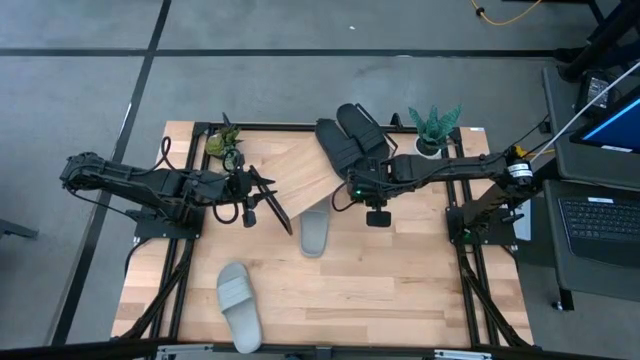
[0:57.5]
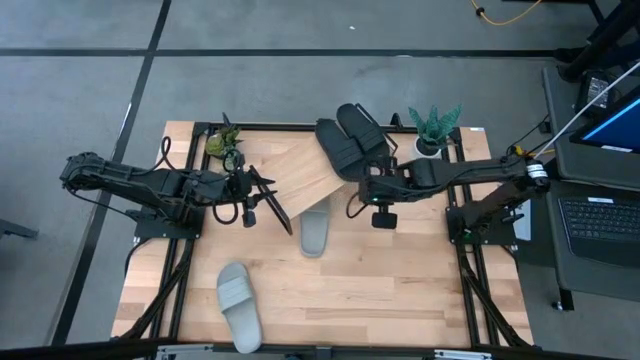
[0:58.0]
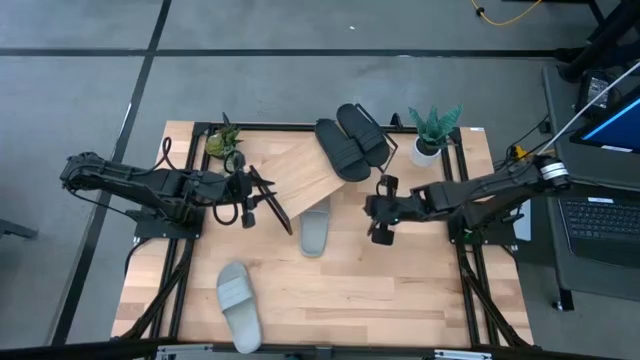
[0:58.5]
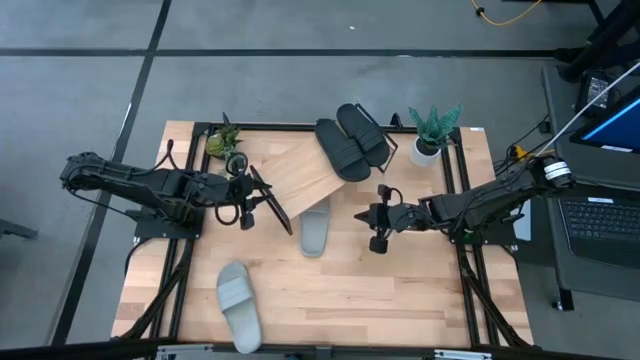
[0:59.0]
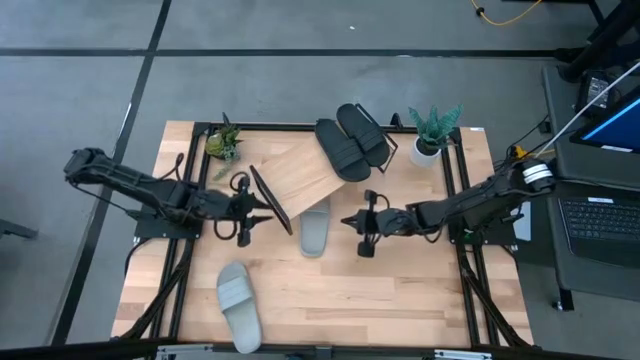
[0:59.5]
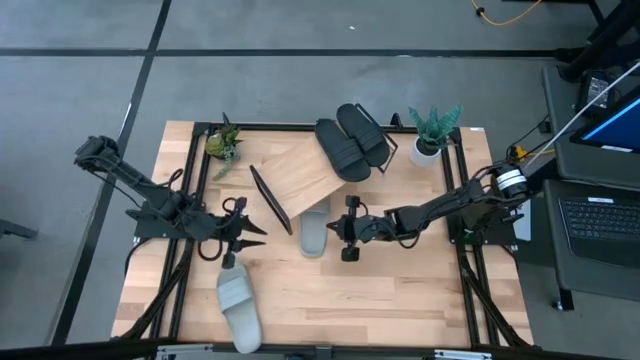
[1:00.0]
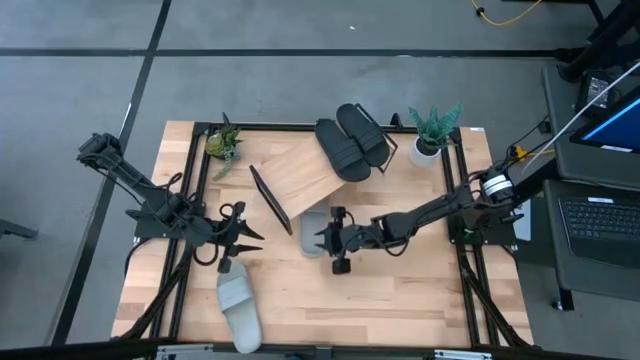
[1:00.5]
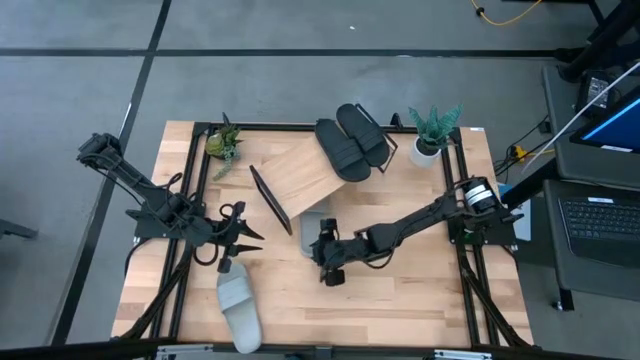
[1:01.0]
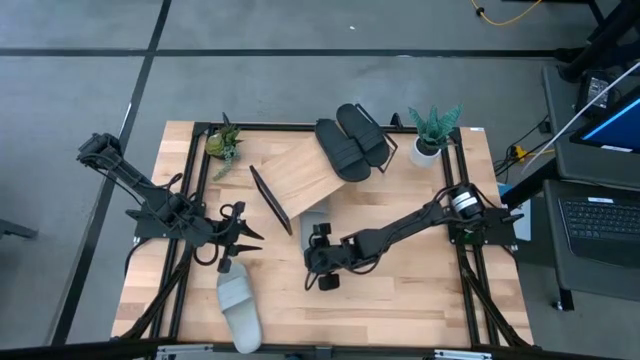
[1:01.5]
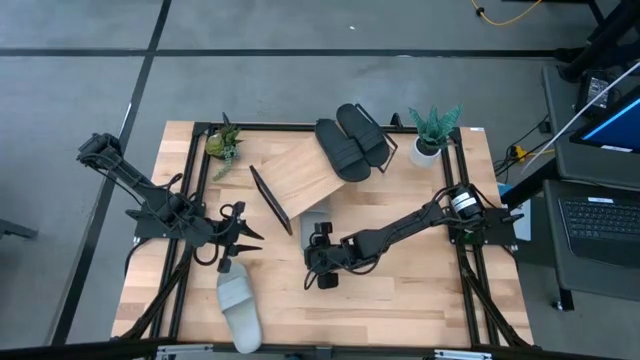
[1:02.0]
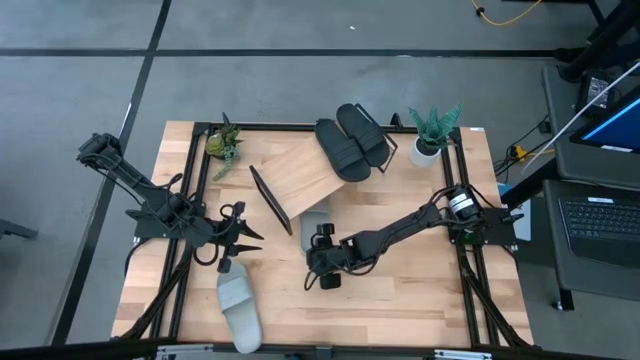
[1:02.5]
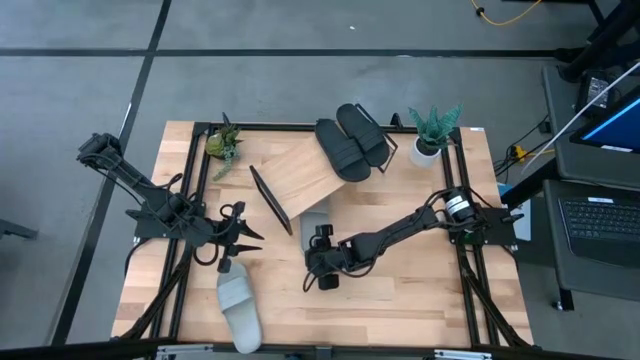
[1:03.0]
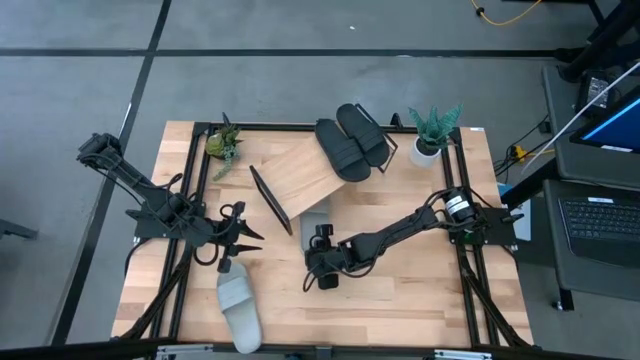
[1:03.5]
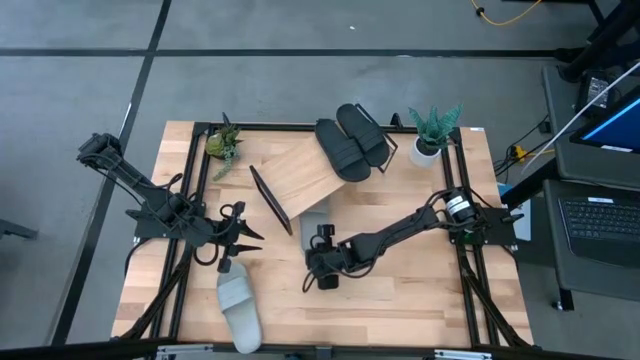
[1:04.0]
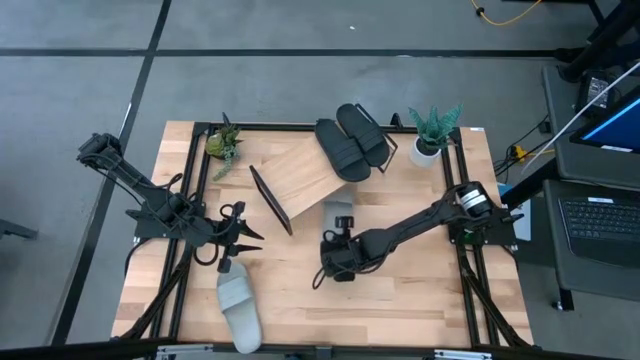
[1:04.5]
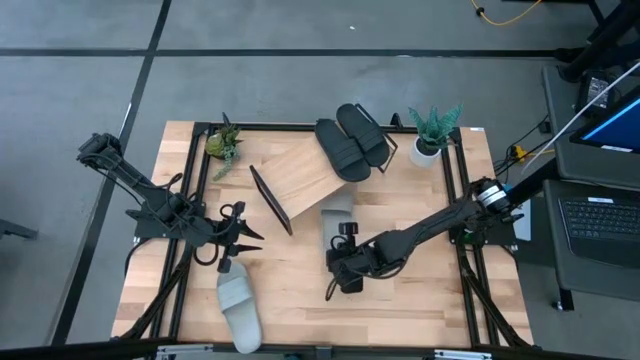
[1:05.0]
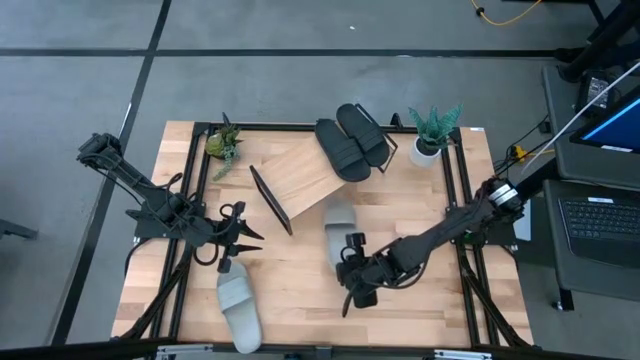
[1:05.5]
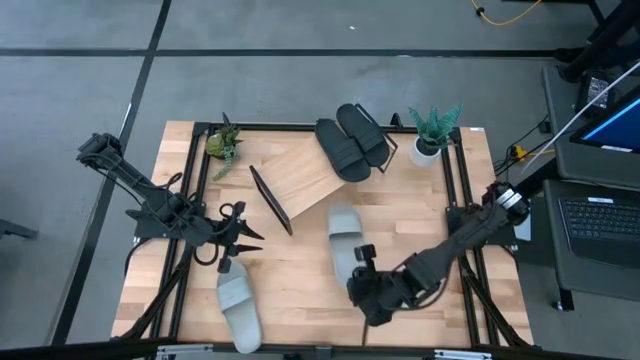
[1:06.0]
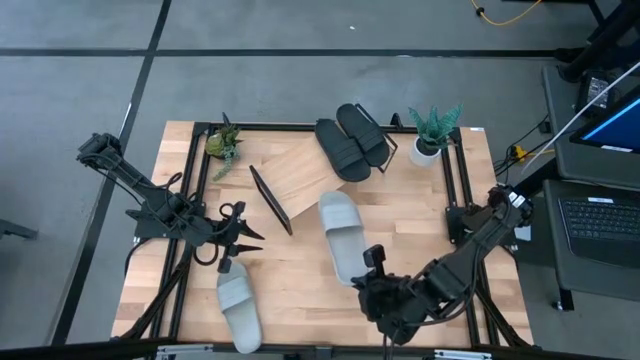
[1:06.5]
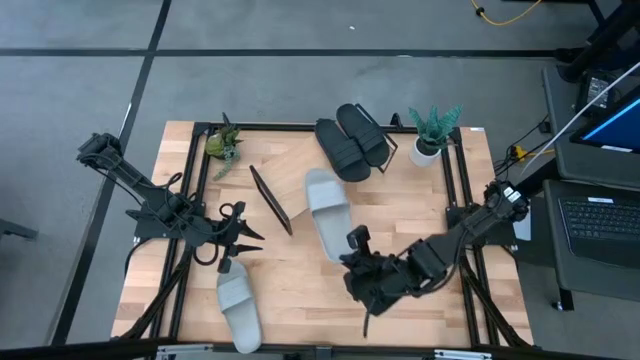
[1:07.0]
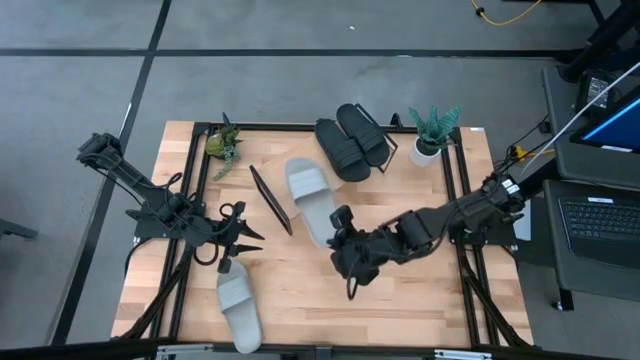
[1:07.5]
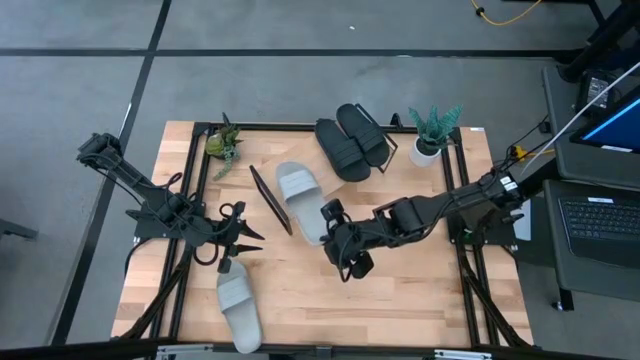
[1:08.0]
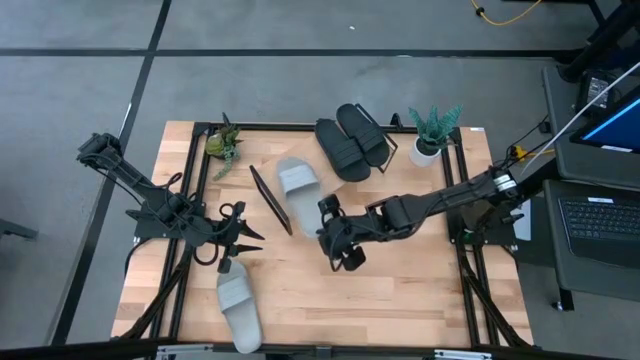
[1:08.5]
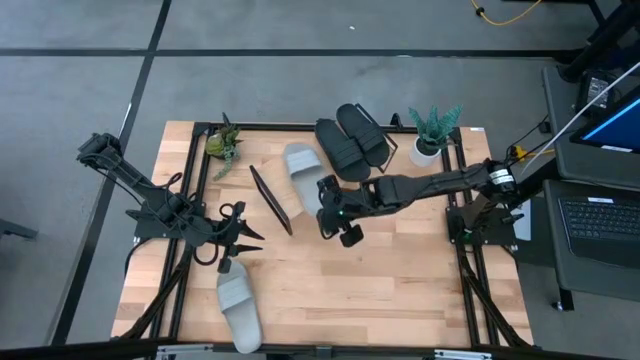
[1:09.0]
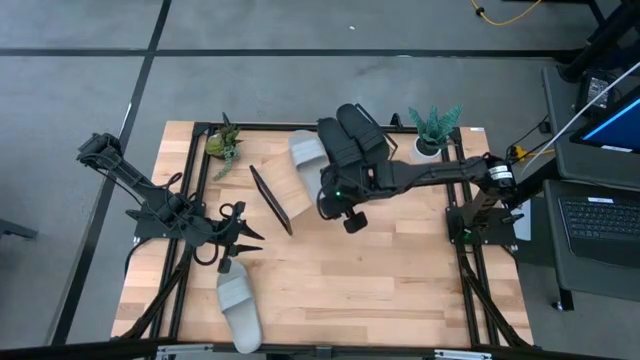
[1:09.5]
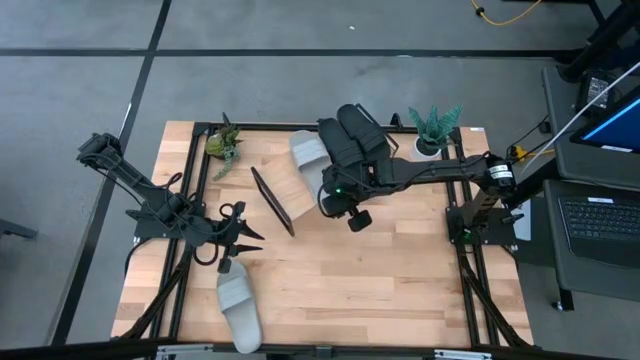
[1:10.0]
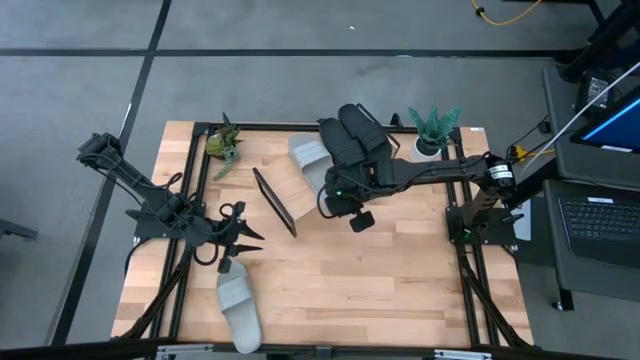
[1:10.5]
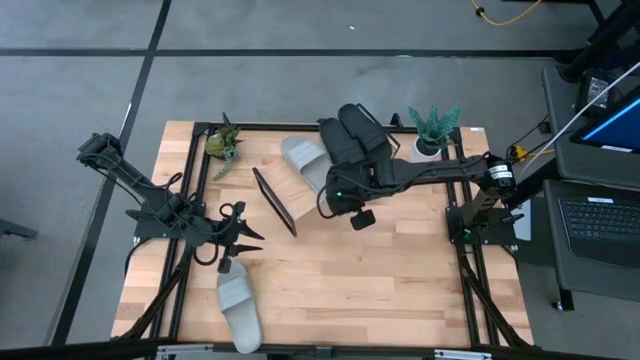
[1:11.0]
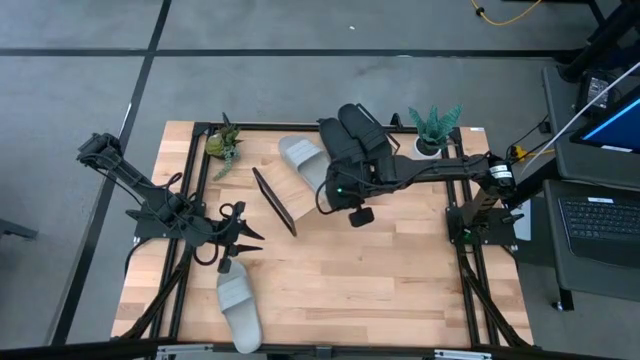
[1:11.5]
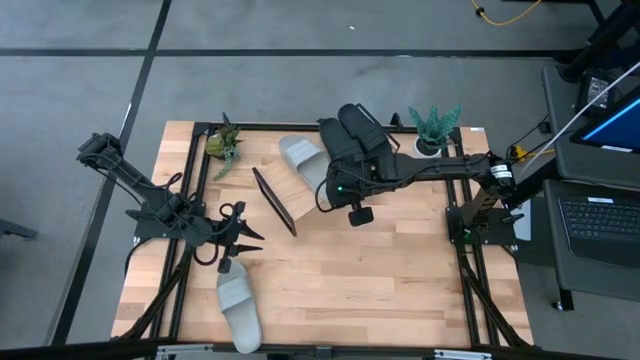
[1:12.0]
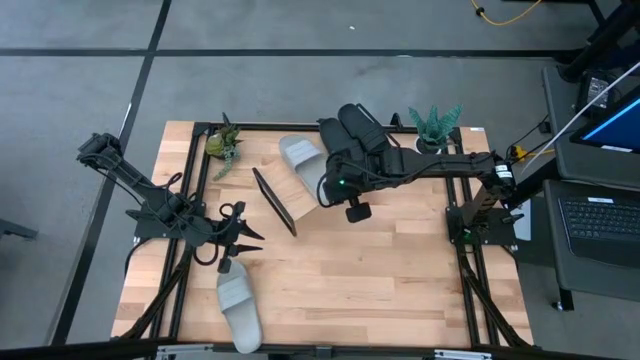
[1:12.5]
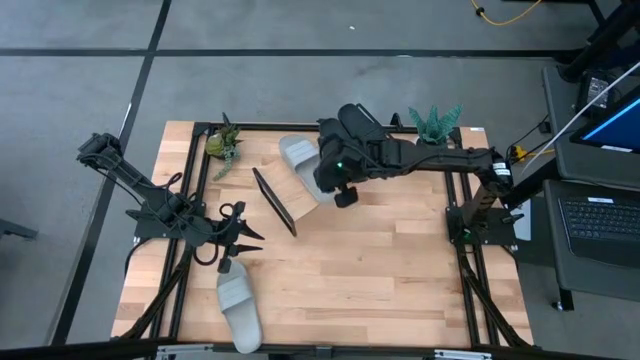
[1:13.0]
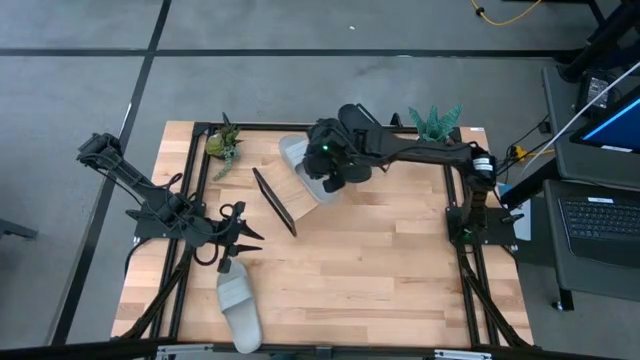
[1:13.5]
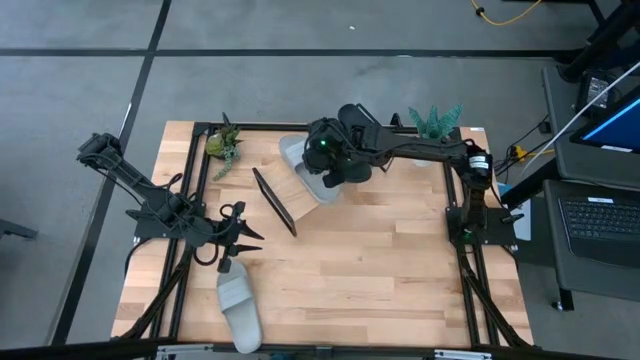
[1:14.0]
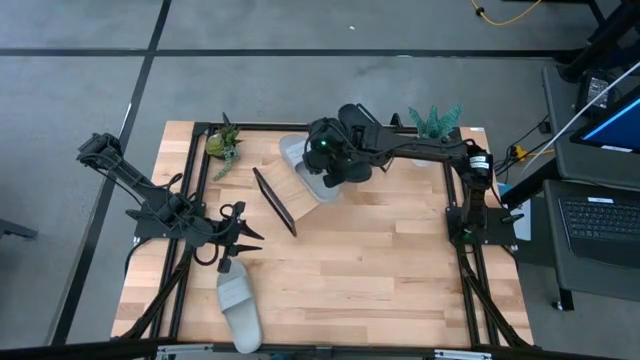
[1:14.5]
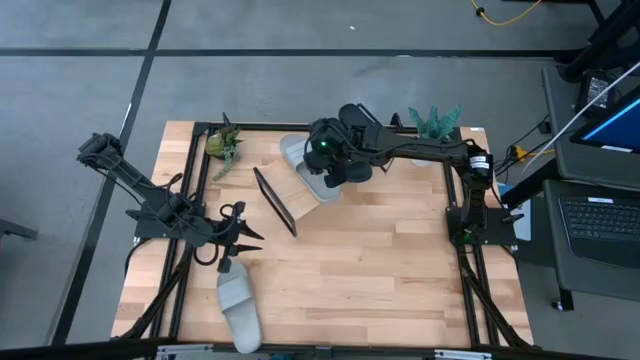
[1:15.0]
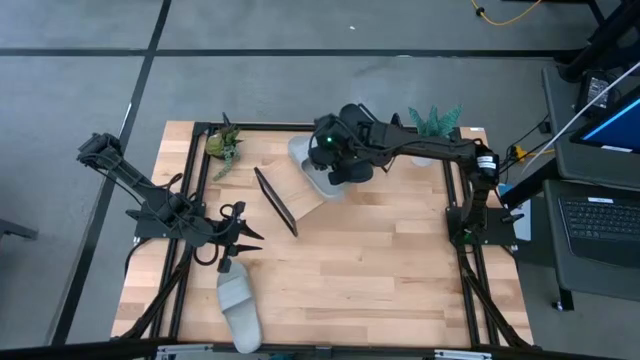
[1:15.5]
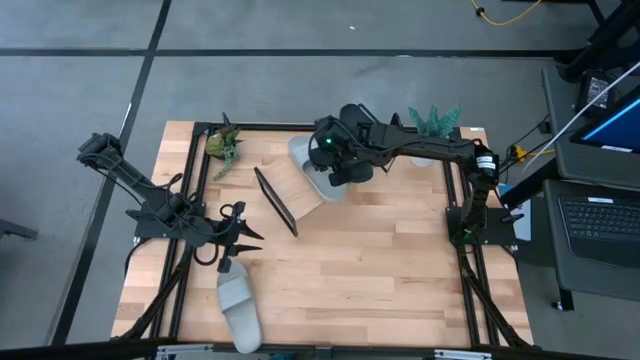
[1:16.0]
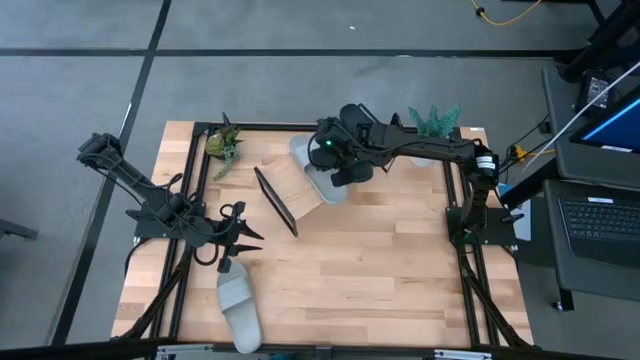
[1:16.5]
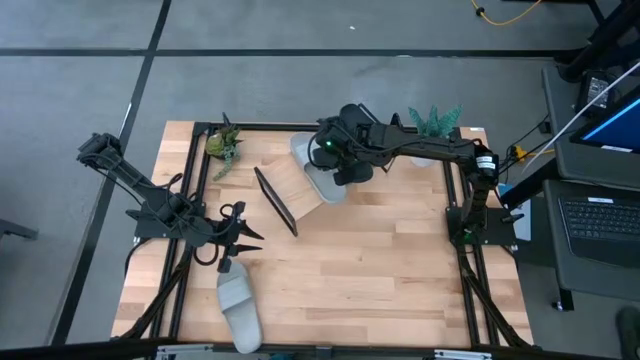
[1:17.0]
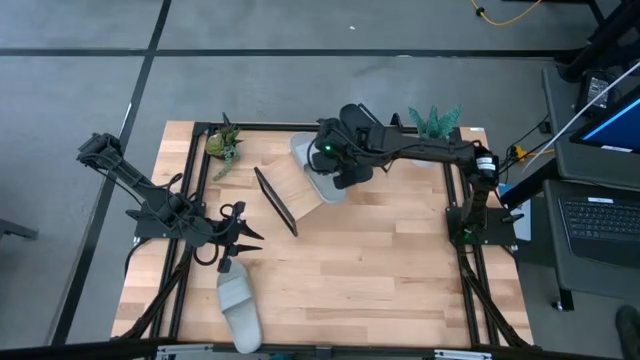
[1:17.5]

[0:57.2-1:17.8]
Task: Pick and place slides into the shelf
Put the right gray slipper on the shelf
